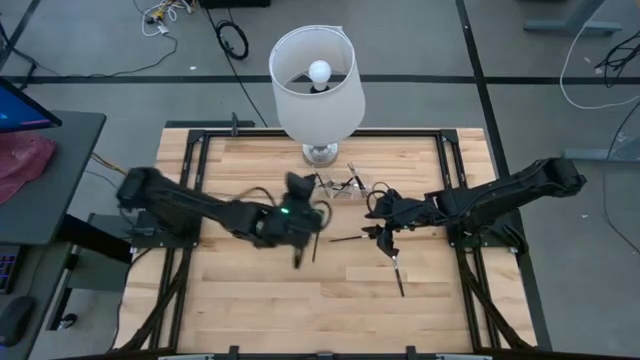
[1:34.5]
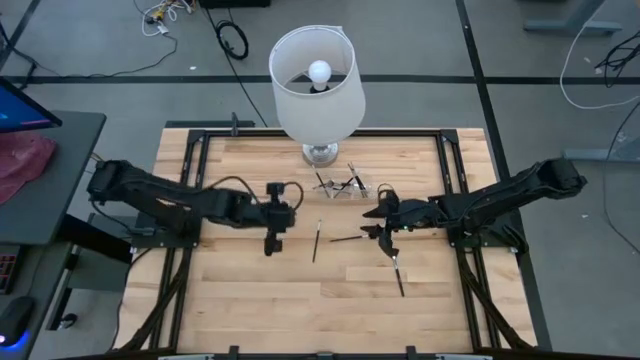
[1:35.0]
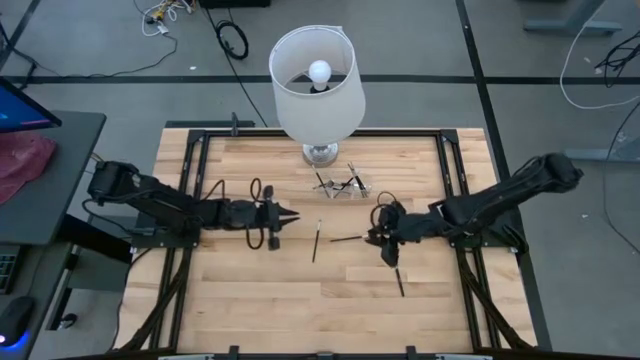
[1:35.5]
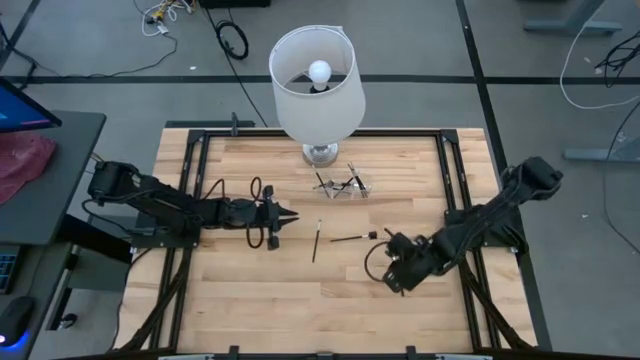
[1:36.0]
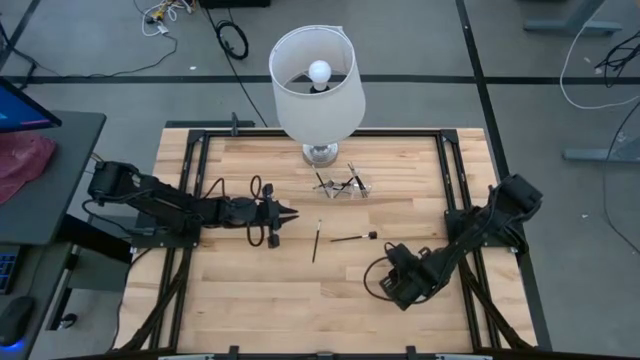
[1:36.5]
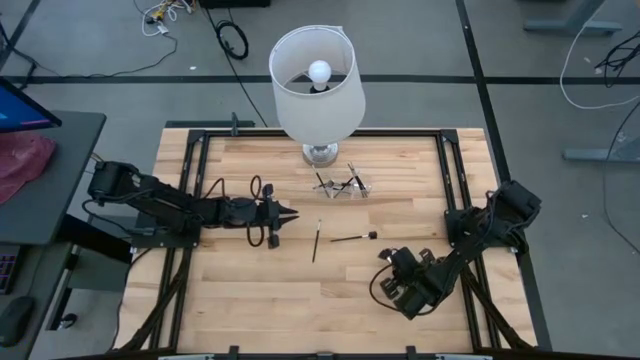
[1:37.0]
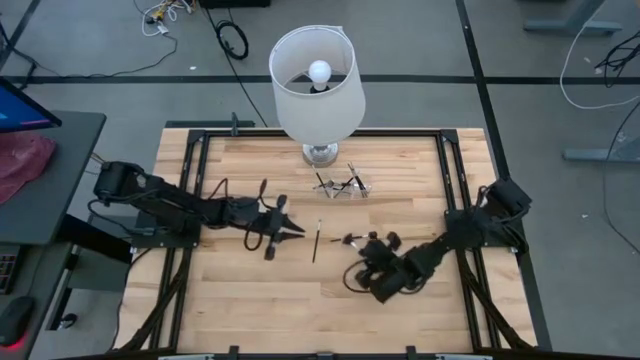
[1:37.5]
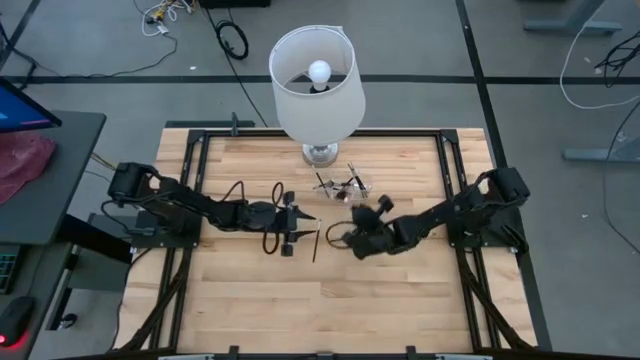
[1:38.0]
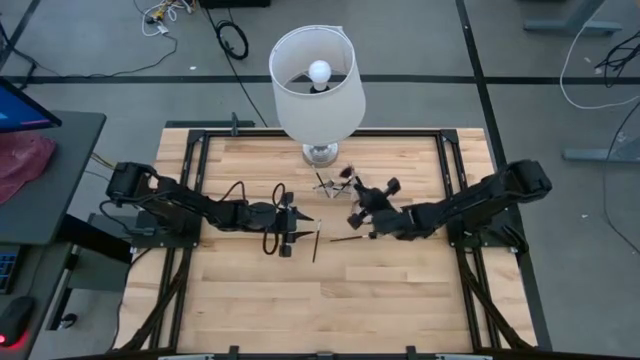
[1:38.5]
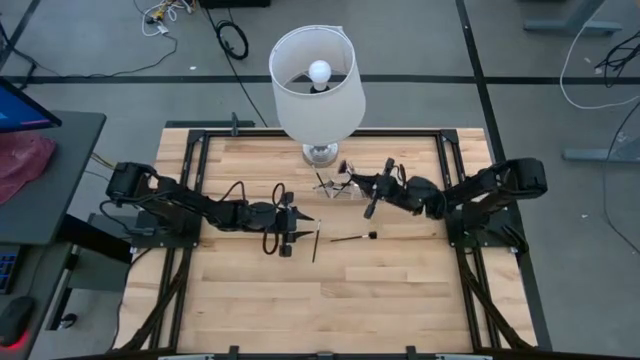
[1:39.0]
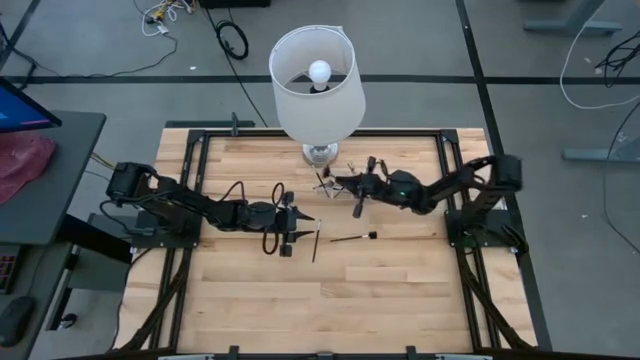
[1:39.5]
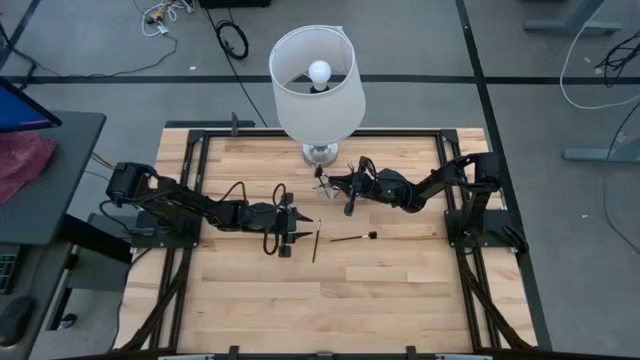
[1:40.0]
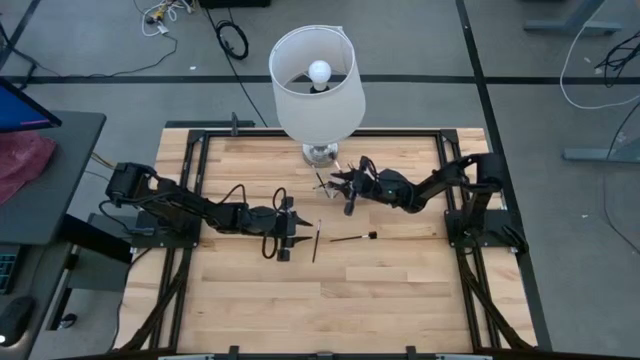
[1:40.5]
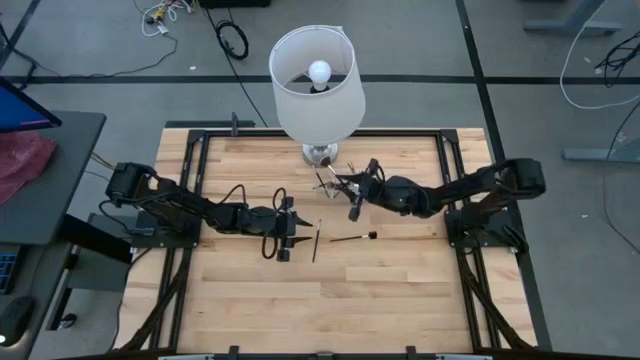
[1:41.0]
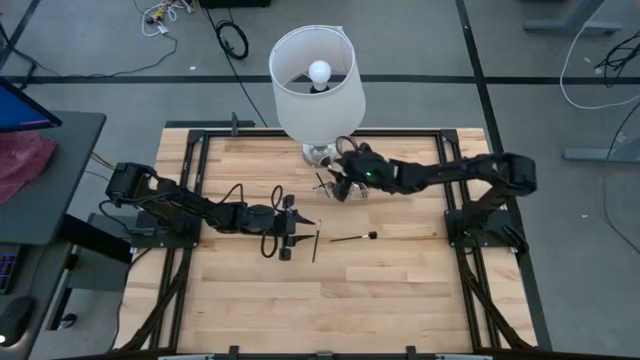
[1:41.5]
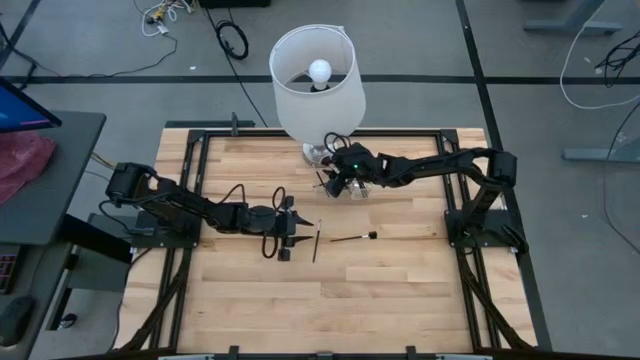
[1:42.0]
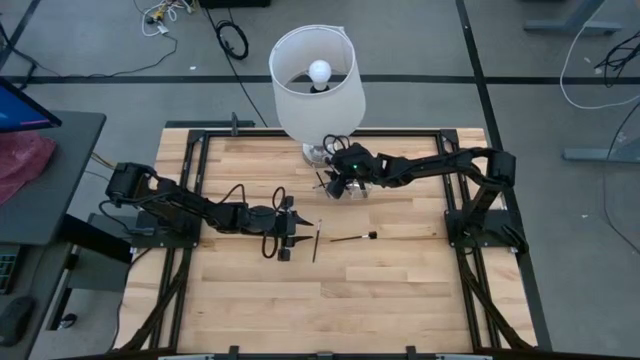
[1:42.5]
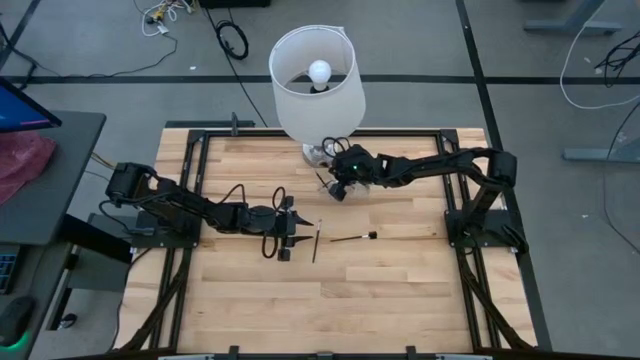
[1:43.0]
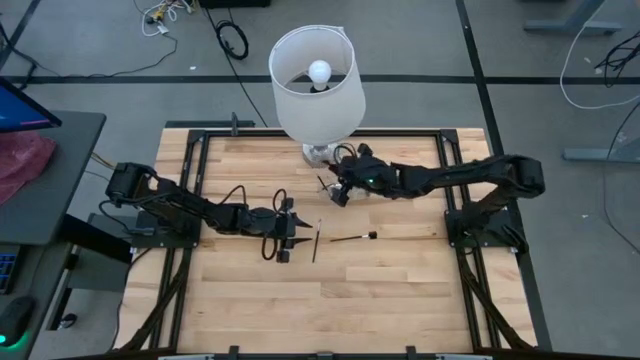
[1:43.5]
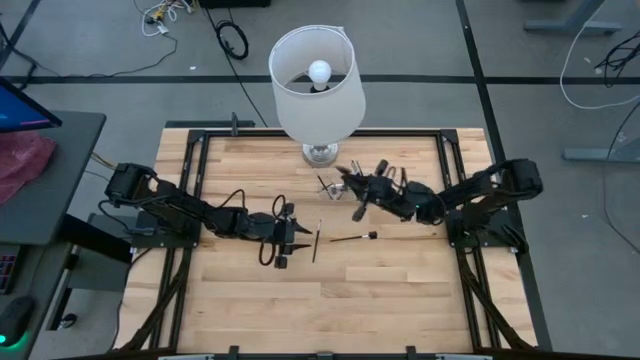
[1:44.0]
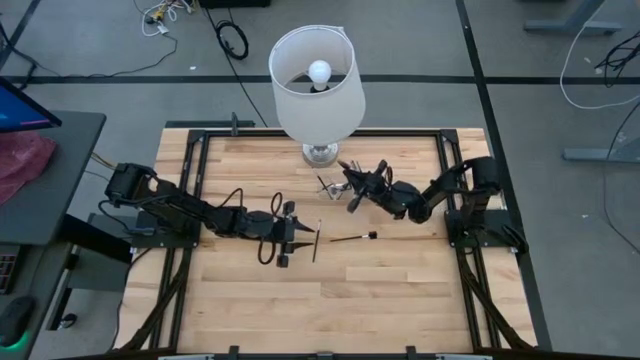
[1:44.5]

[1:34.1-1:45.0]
Task: Put items in baskets/containers
Put the black highlighter brush into the transparent organizer
